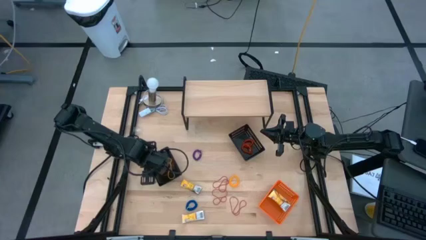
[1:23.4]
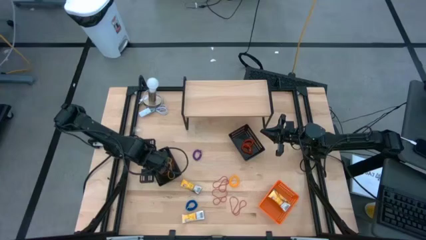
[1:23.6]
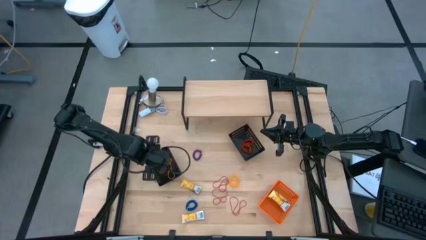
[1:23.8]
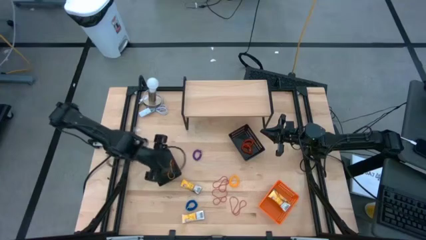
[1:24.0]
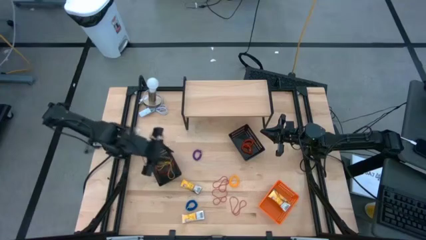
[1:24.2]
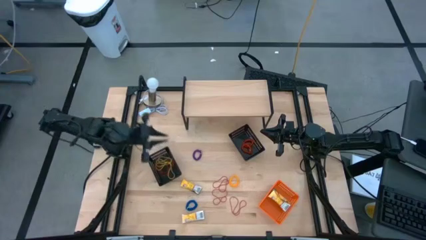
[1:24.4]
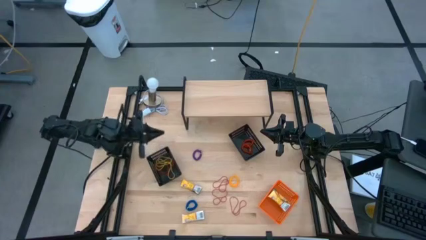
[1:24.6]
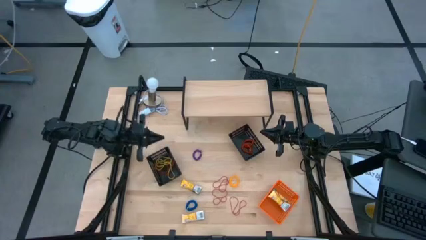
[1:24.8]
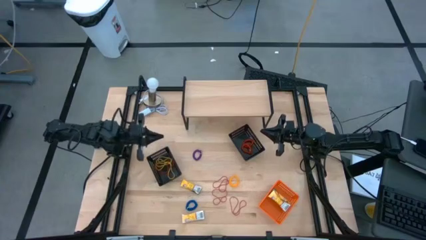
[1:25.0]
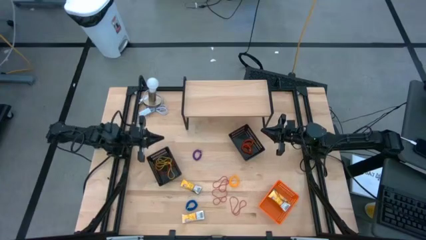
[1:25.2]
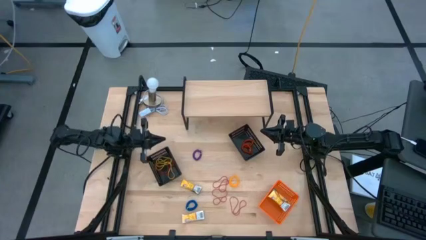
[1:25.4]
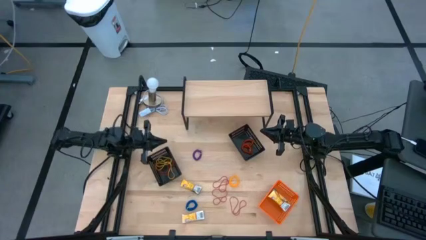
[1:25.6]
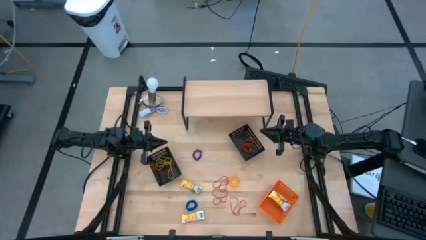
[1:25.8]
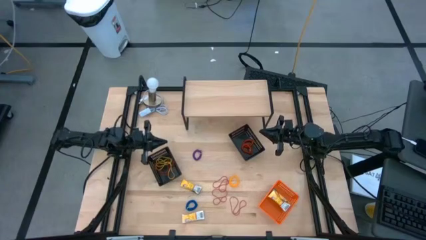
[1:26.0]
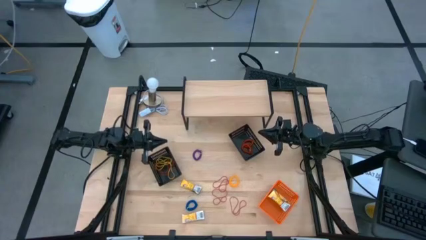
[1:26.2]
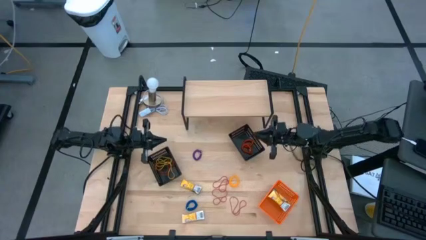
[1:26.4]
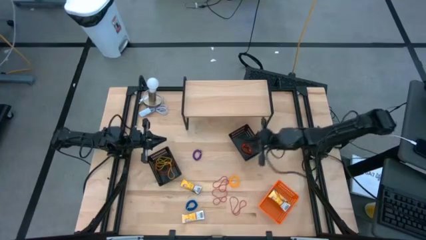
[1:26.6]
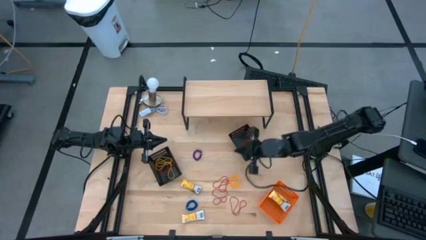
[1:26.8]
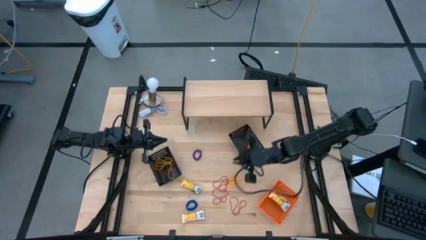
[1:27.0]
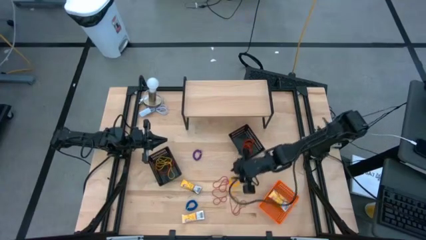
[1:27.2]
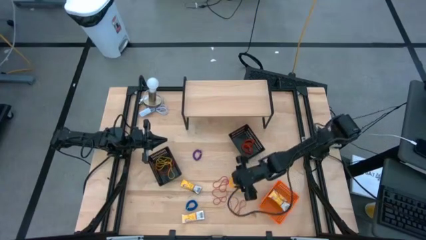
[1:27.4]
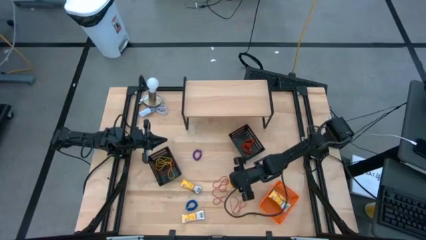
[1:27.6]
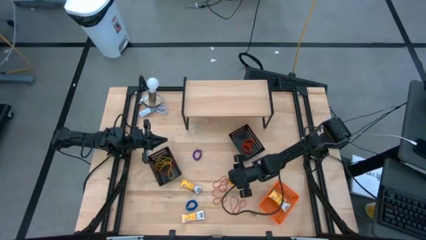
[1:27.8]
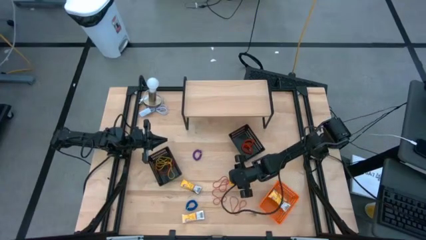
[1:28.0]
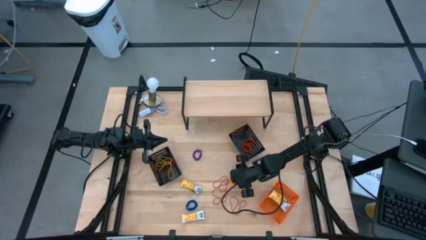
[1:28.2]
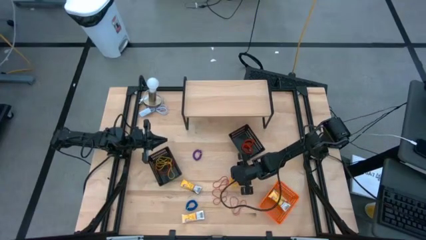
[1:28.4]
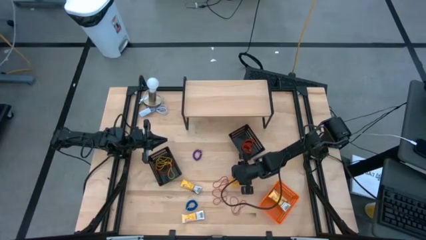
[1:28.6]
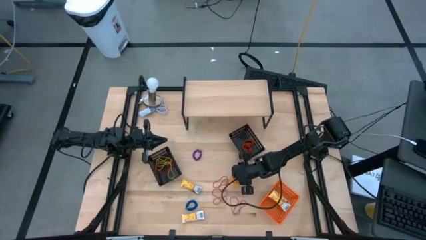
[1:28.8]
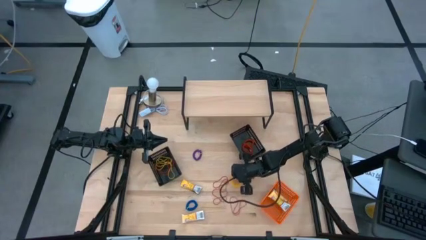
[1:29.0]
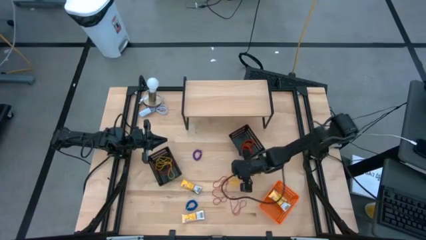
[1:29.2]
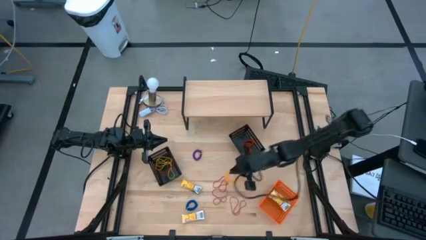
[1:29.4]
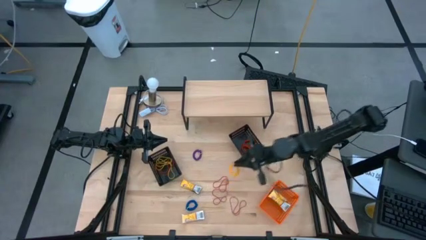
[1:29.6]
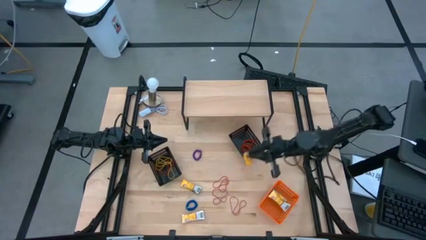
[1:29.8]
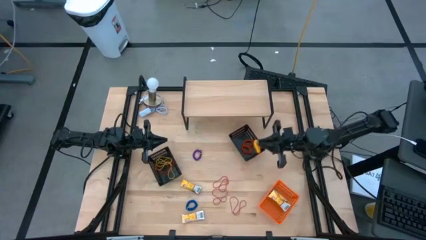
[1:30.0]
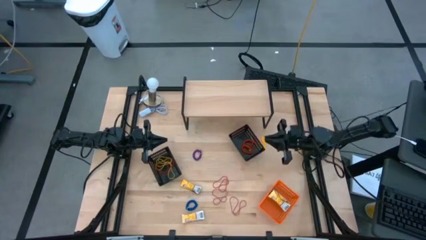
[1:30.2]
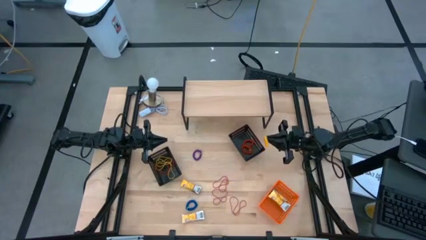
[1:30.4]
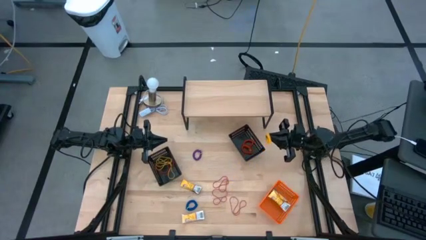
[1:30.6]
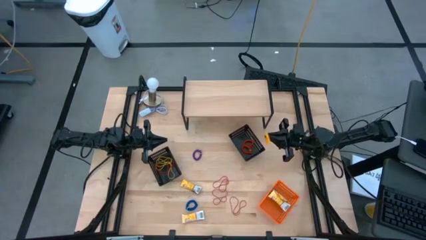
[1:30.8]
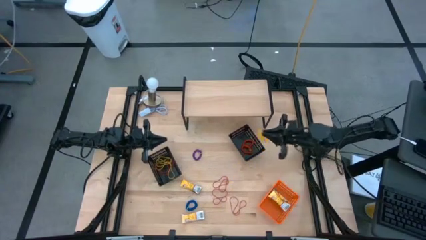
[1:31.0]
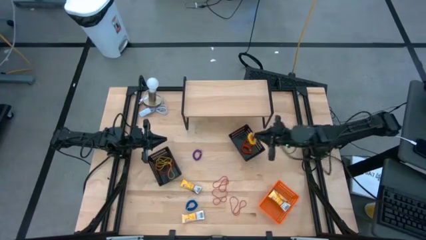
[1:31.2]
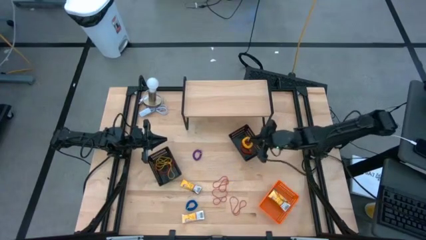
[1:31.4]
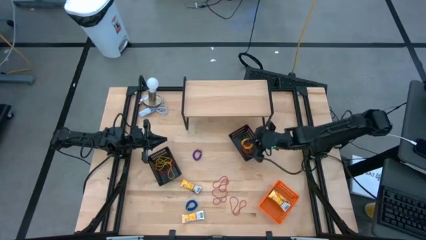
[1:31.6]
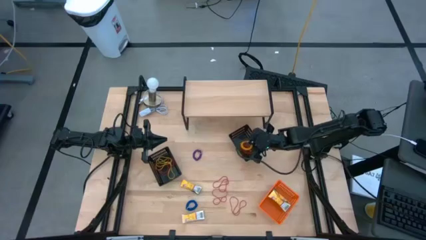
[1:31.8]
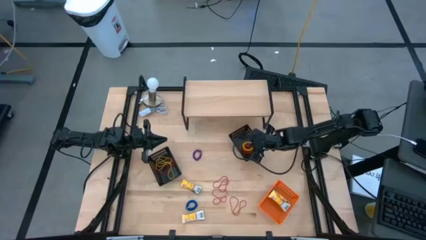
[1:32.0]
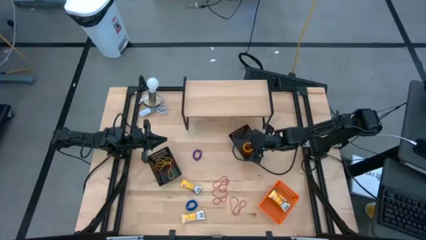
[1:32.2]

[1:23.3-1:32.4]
Task: Pick & Place Office Desk Supplies
Put the yellow spring keychain into the right black bin

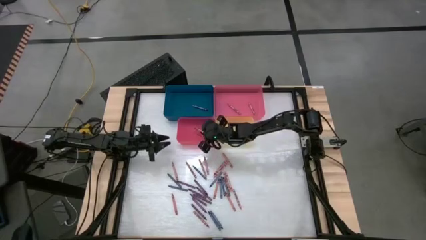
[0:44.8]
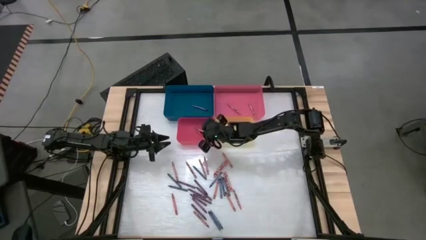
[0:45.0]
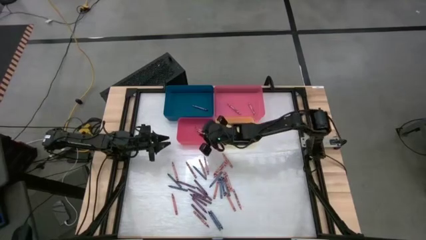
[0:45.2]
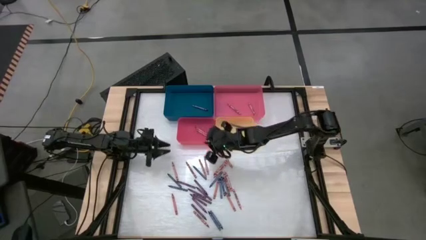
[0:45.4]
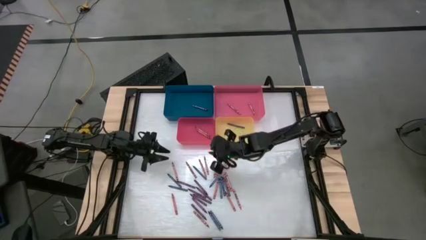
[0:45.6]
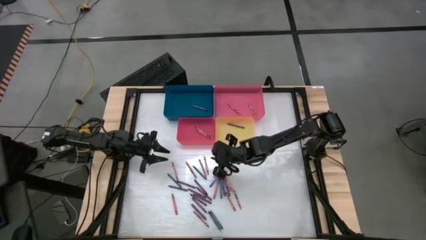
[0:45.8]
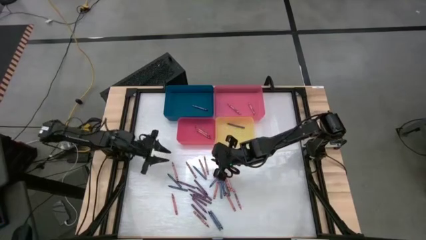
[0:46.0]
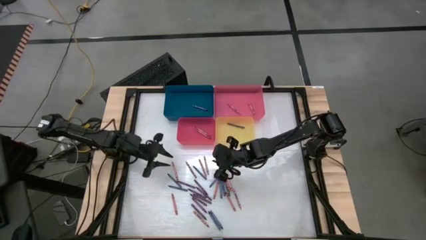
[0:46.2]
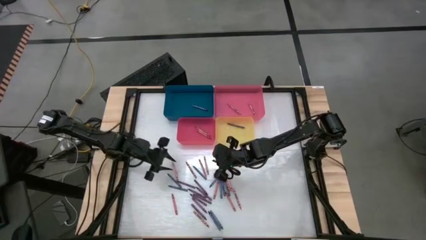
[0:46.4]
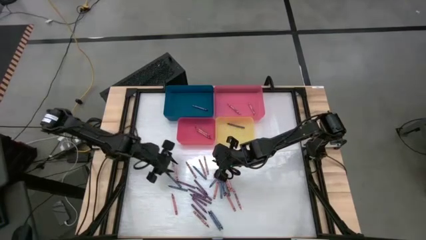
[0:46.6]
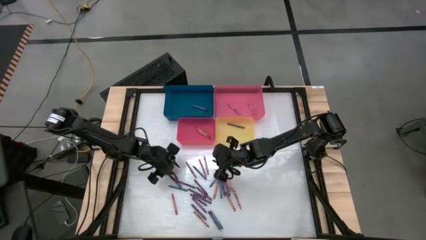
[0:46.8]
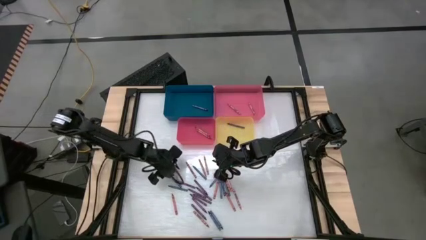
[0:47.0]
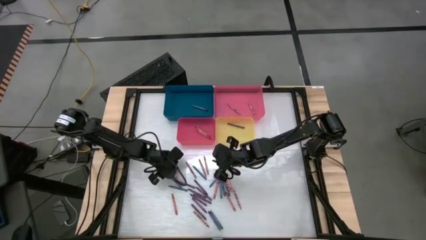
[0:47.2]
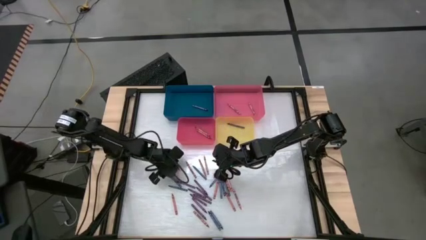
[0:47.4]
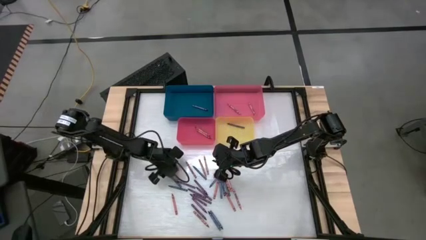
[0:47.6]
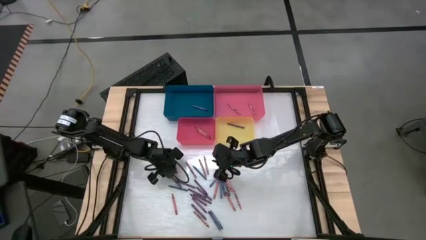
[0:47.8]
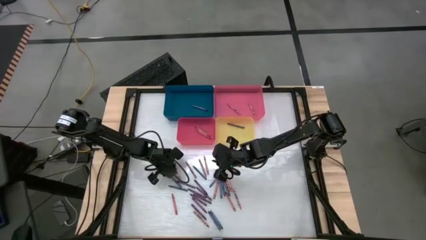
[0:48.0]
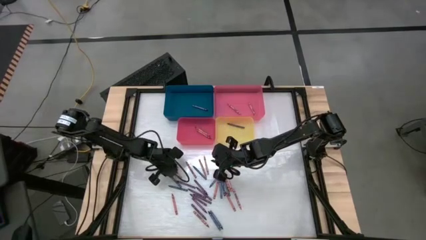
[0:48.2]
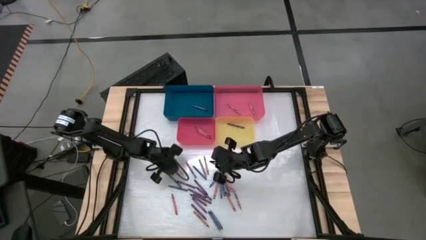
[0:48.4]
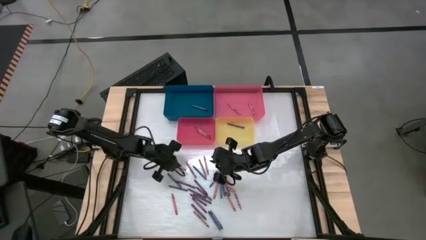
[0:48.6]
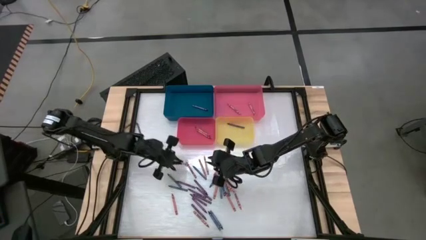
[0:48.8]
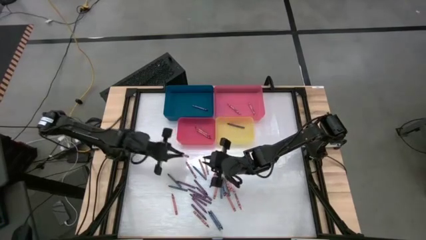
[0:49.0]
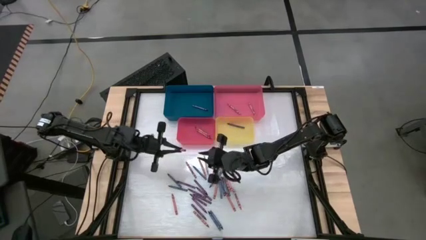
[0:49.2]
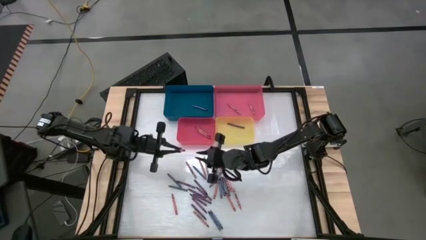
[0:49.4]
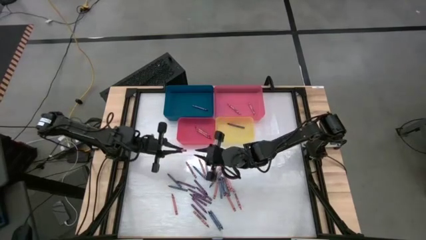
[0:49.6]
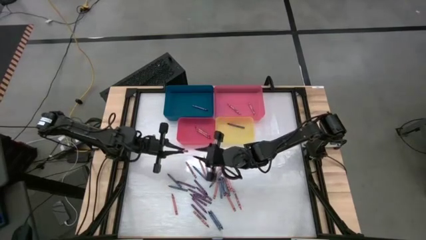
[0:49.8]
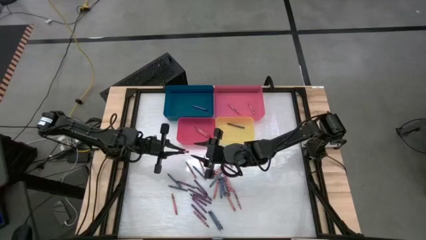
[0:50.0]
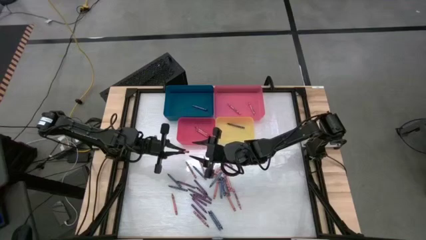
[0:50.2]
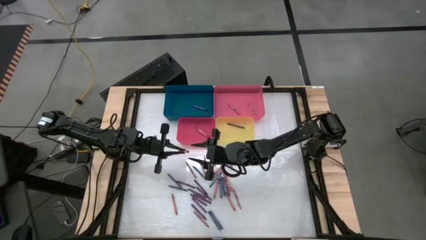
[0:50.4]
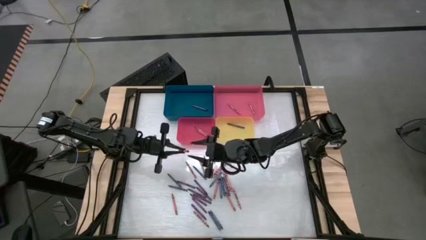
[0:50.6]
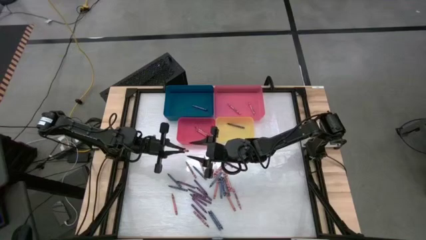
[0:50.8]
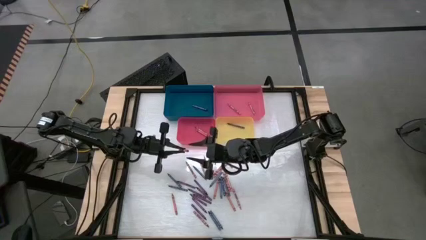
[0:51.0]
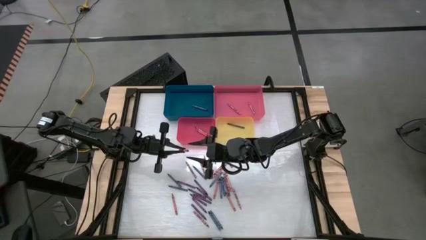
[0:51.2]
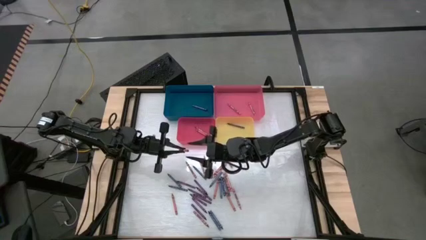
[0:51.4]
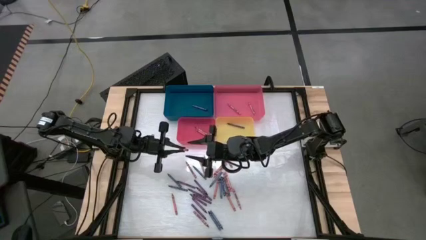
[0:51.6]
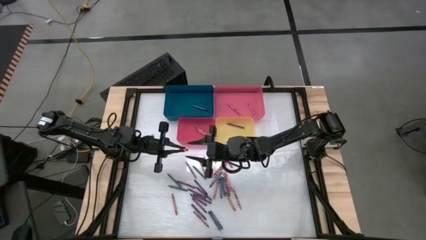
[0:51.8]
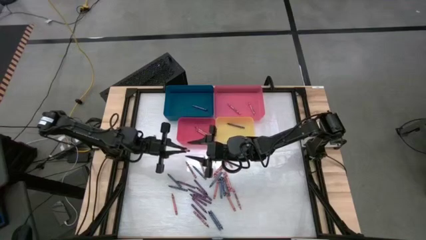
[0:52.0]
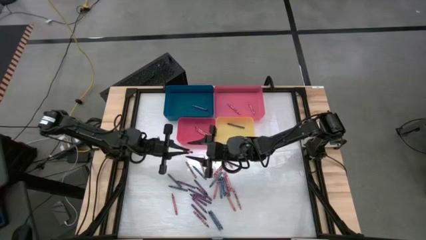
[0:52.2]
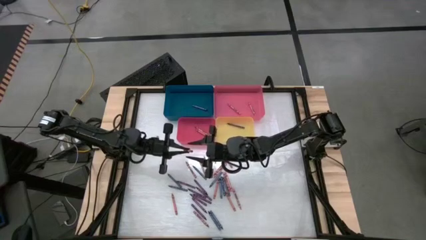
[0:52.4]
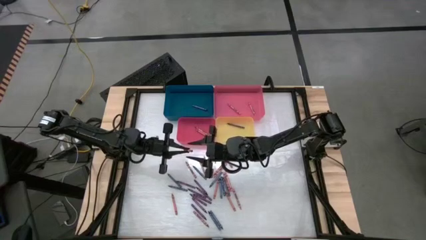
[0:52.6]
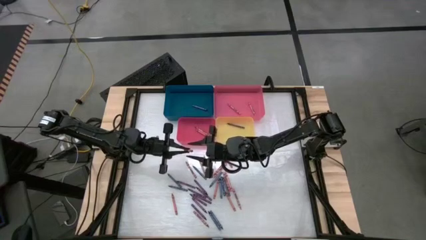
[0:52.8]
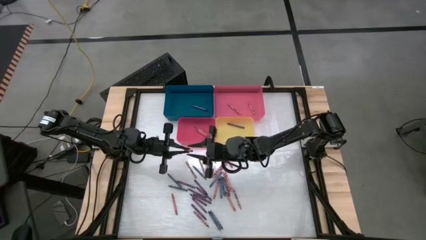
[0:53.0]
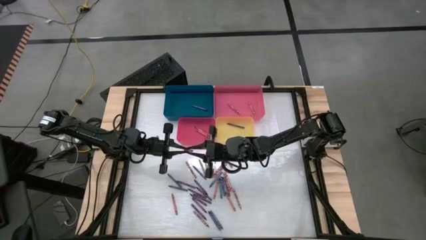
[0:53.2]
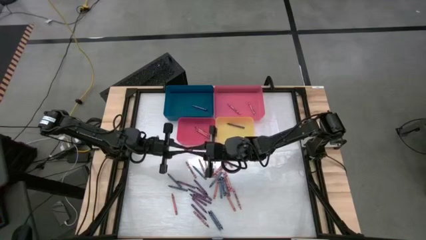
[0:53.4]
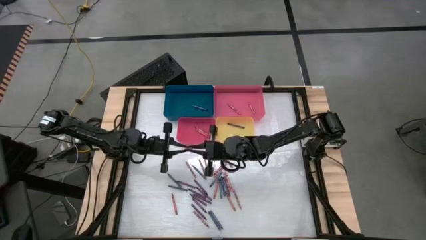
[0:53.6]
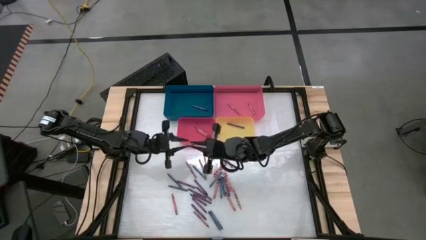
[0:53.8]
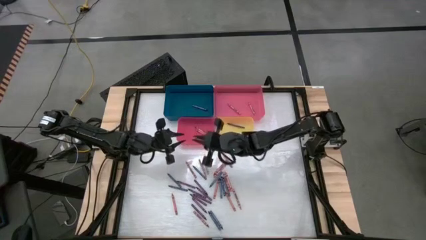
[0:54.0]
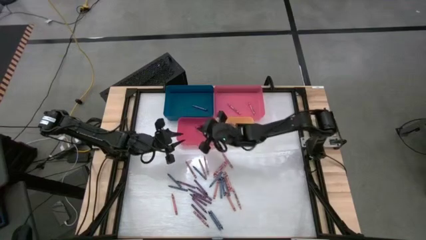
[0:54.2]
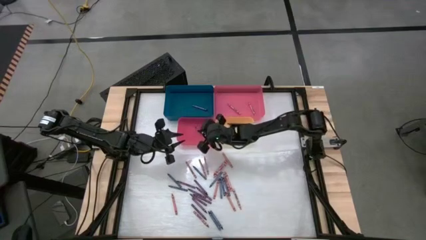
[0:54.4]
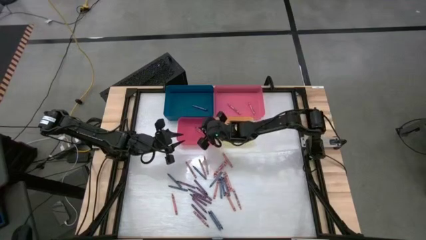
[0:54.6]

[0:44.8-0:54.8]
Task: Sort crayons
Put the red crayon into the red bin
